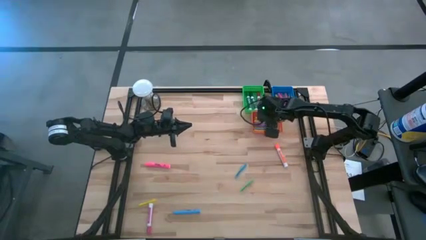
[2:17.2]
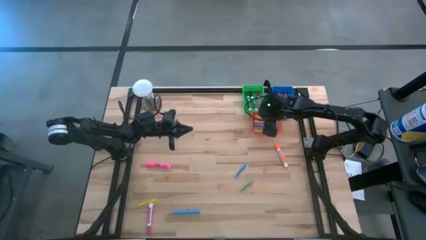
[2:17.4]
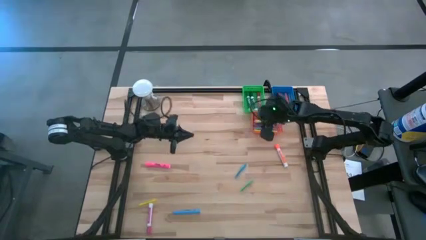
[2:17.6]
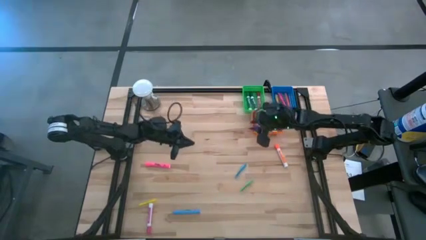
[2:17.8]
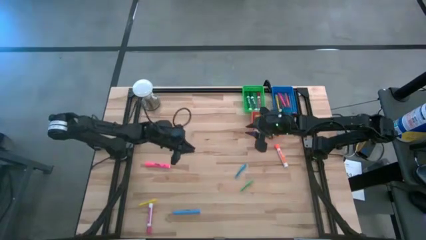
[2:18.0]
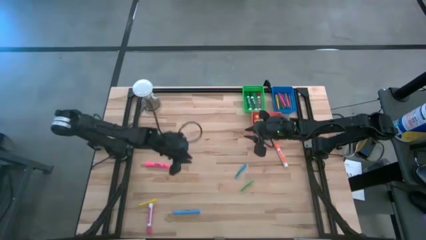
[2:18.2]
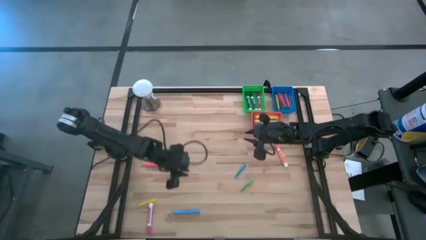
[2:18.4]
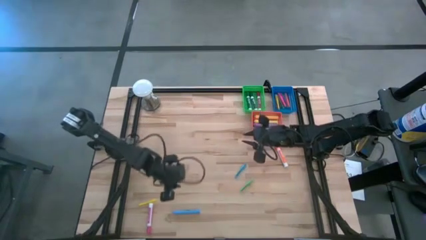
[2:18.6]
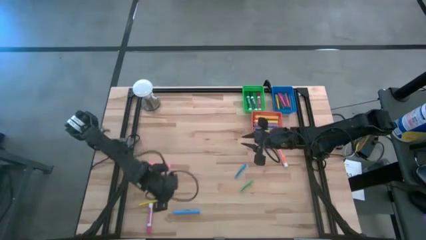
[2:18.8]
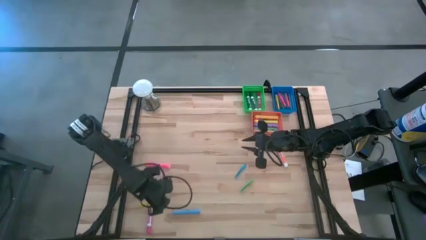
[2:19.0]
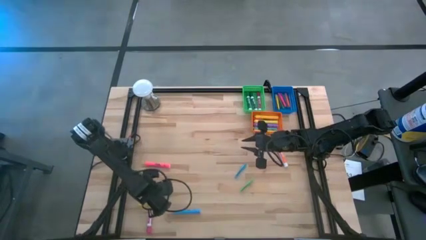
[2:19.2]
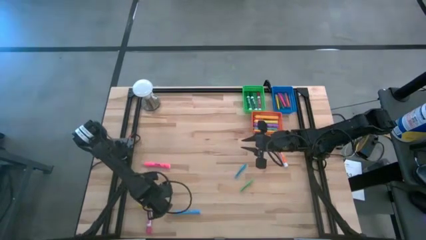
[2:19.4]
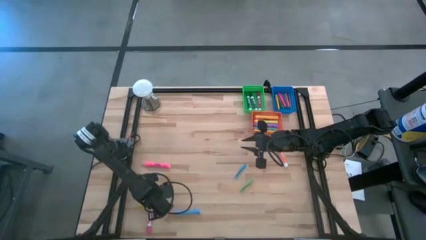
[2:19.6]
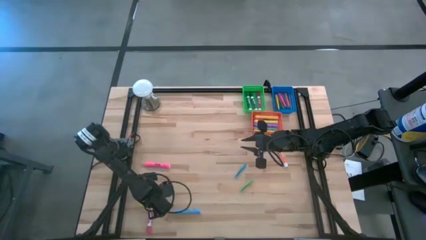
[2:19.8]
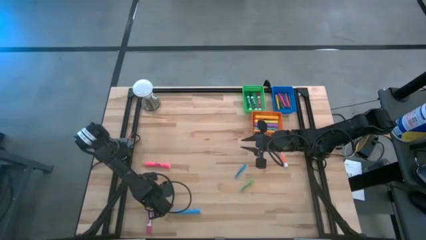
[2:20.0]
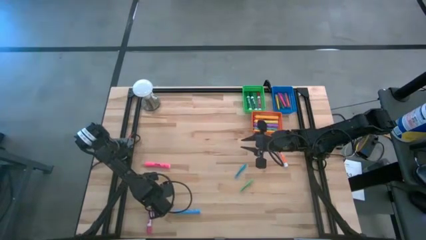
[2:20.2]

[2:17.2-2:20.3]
Task: Pick & Place Markers
Put the yellow pen into the blue bin

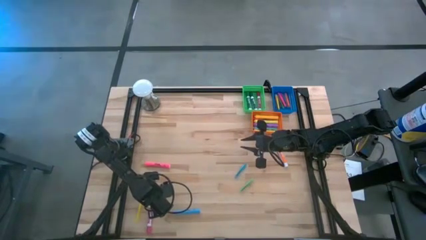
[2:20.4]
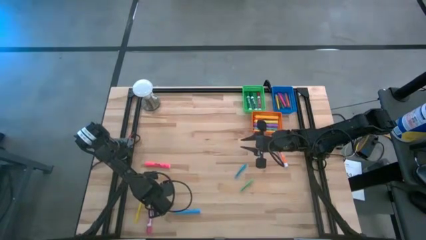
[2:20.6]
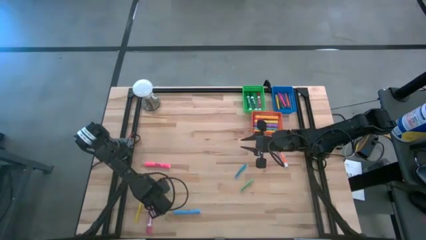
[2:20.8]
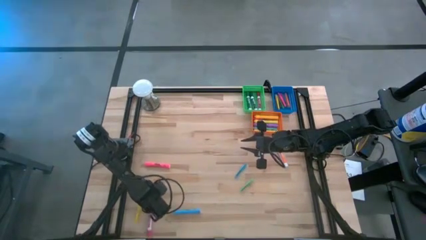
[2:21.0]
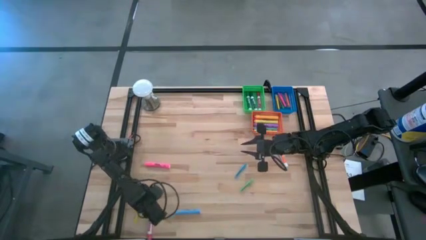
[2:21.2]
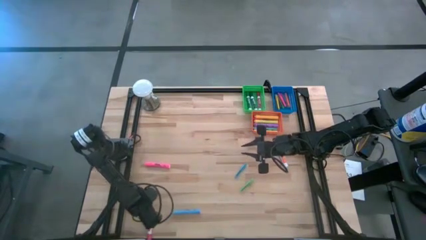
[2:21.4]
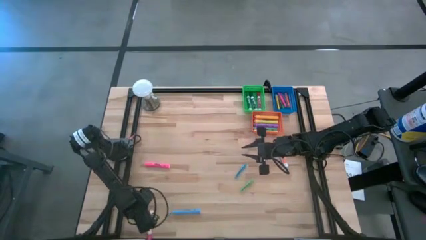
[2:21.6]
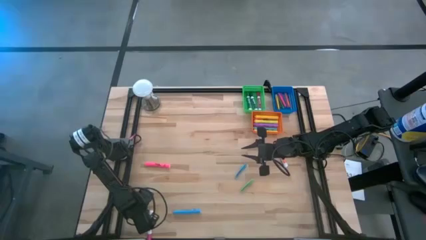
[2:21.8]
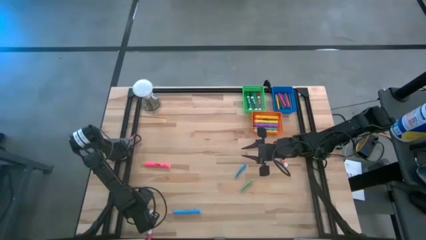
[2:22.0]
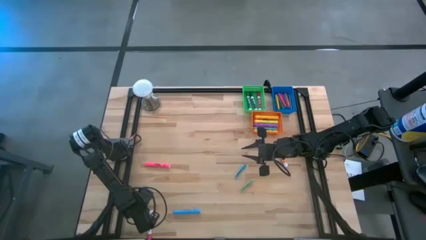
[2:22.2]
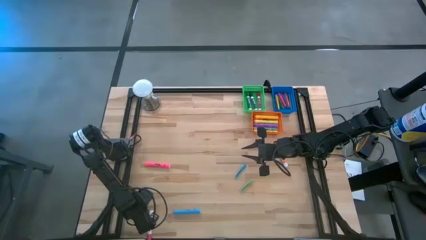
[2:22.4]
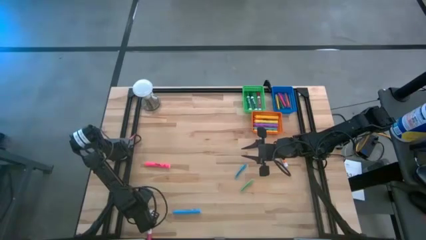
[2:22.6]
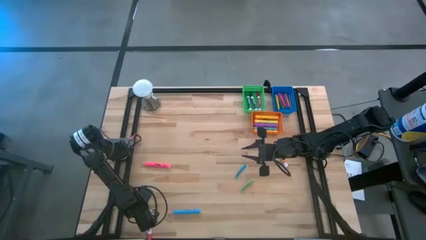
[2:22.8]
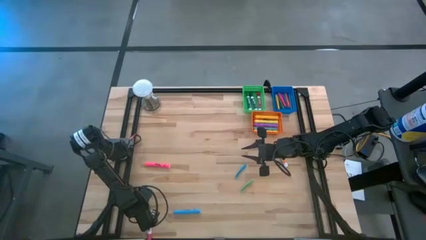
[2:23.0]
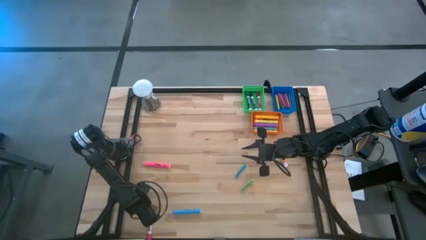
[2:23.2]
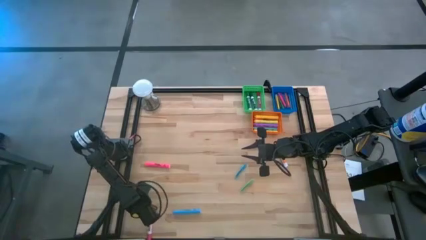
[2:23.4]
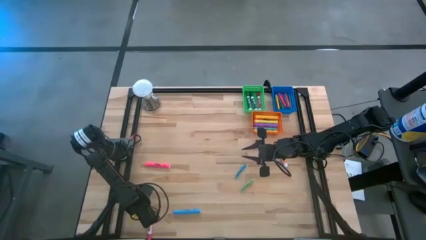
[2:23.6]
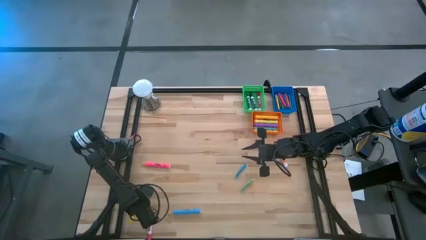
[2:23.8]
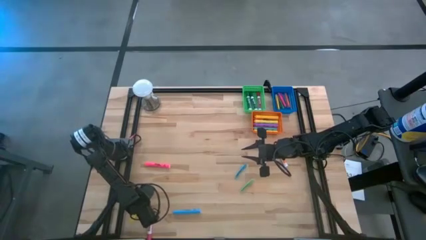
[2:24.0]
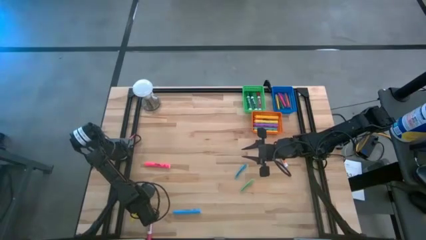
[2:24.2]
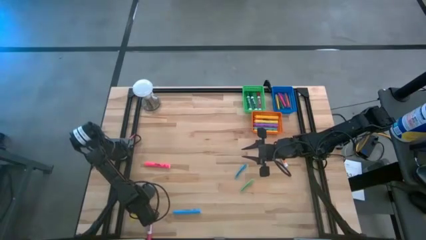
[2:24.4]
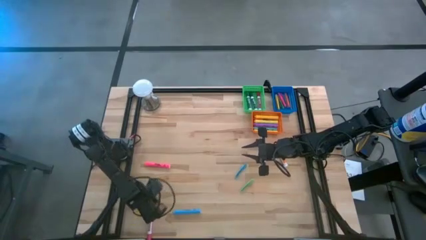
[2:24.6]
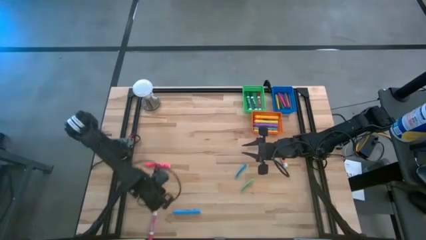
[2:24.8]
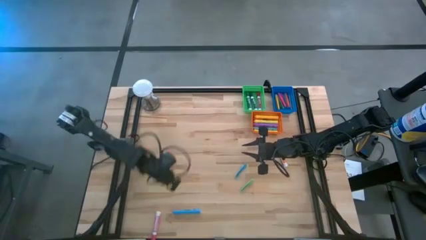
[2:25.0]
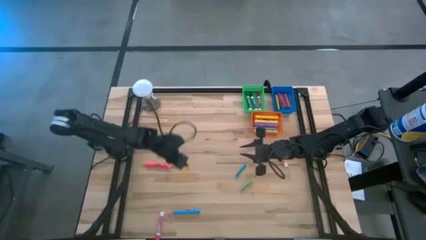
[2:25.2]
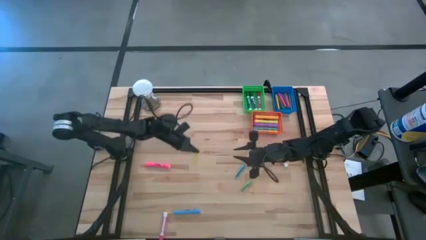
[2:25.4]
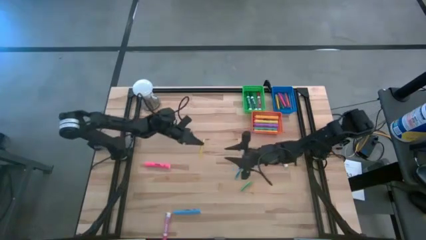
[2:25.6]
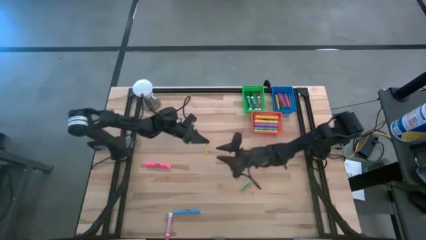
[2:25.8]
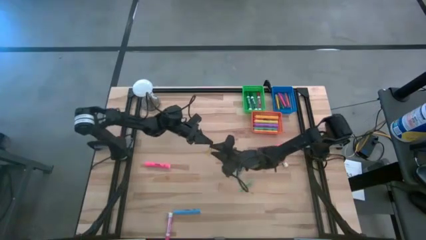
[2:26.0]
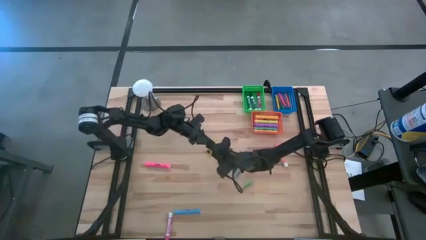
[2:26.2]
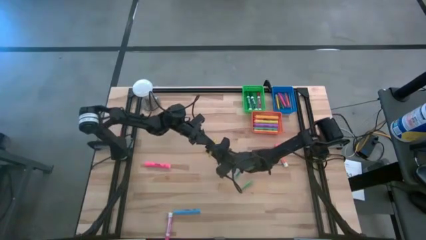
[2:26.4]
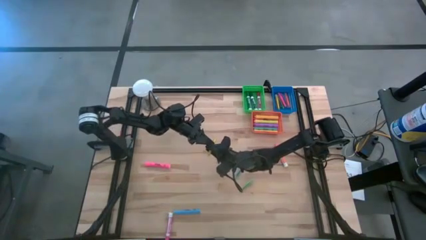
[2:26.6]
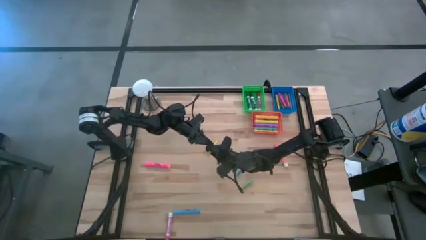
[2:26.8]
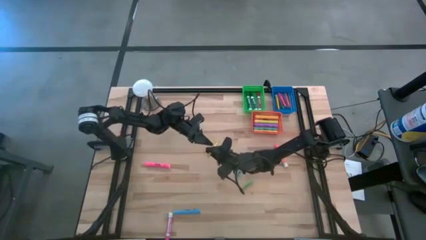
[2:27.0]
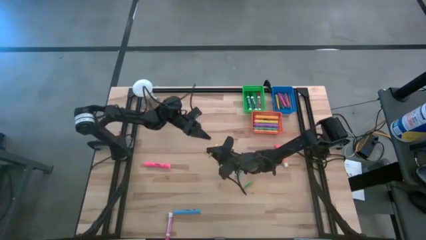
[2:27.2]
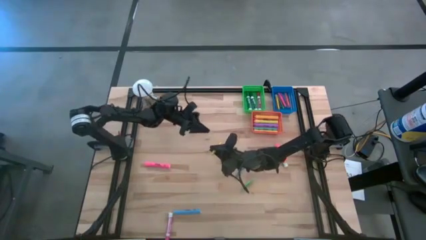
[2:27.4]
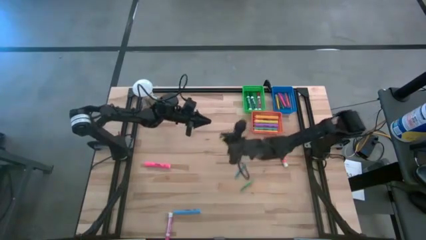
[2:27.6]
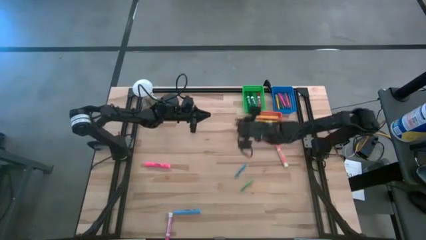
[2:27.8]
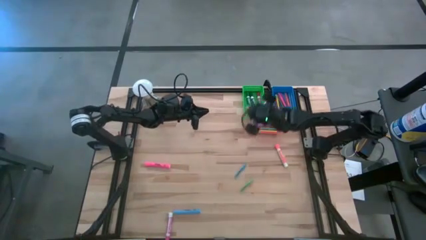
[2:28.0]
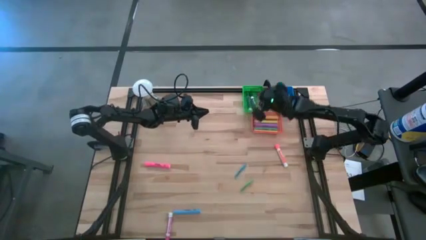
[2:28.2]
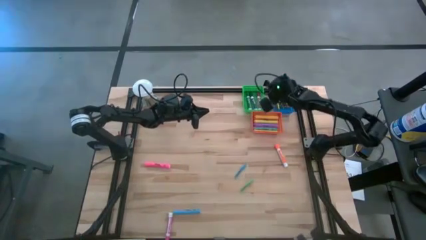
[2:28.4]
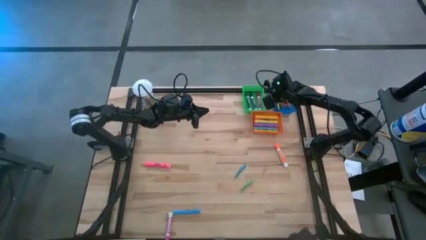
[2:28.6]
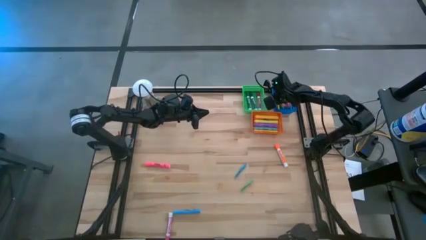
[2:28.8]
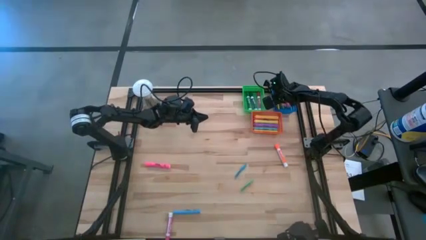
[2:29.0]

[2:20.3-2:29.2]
Put the yellow pen into the blue bin

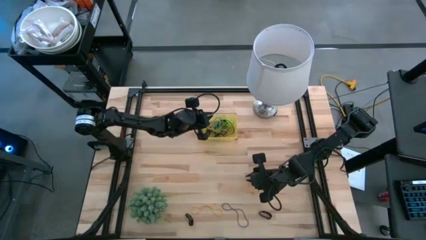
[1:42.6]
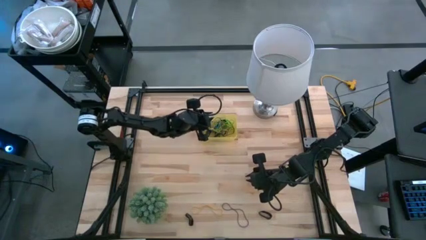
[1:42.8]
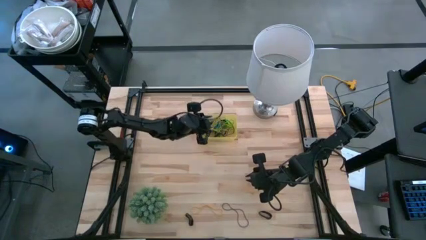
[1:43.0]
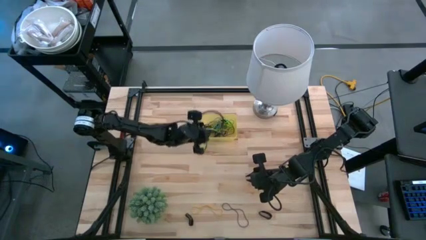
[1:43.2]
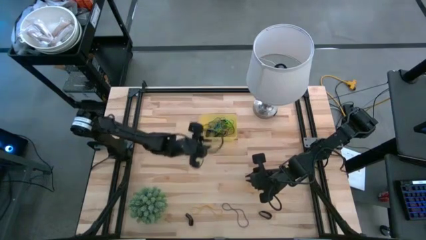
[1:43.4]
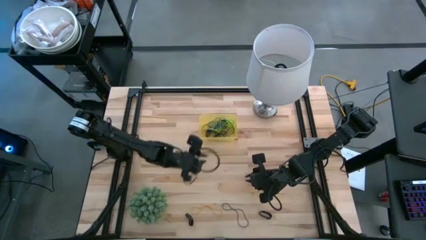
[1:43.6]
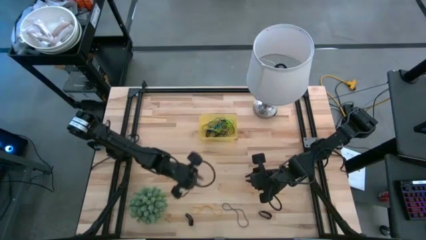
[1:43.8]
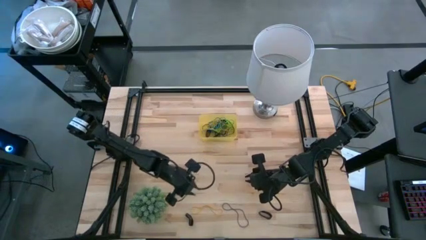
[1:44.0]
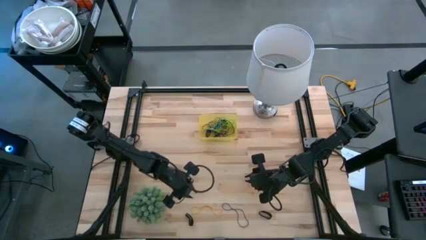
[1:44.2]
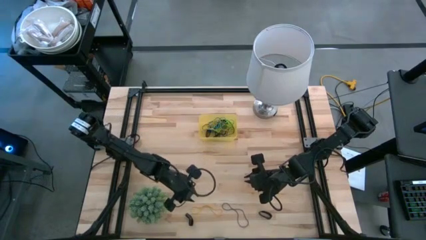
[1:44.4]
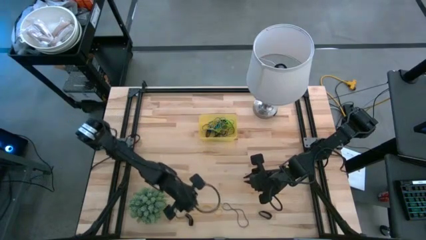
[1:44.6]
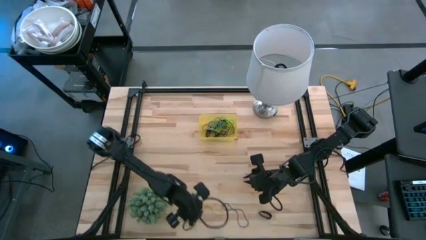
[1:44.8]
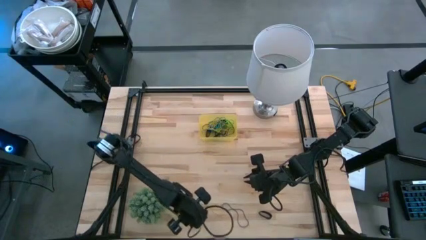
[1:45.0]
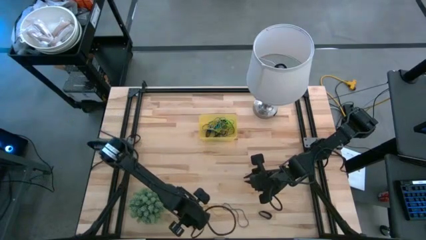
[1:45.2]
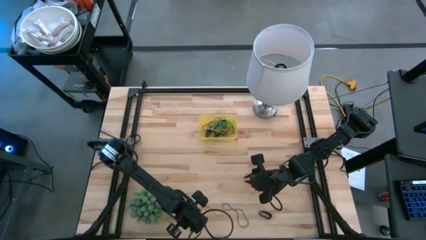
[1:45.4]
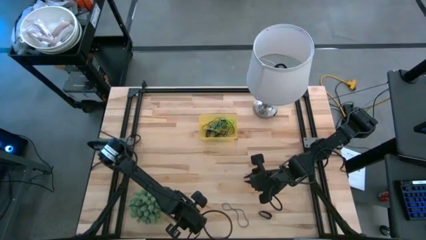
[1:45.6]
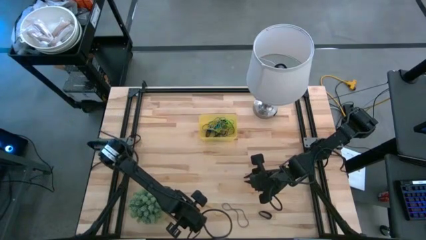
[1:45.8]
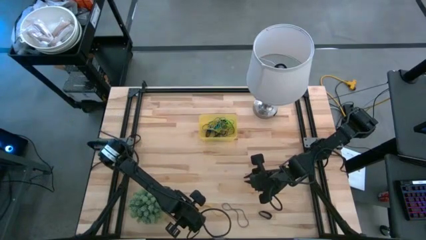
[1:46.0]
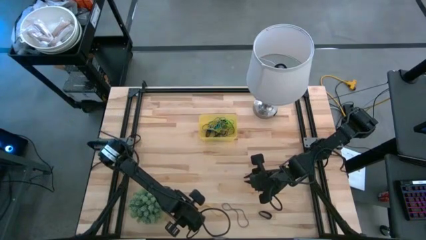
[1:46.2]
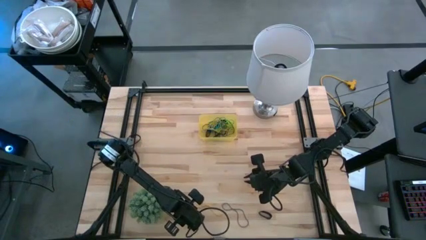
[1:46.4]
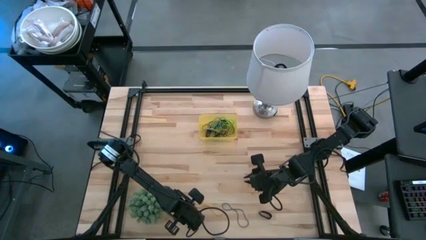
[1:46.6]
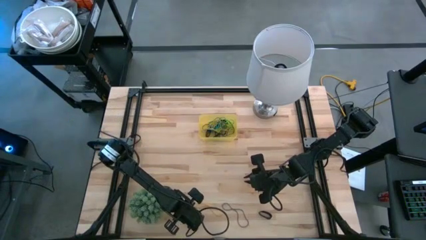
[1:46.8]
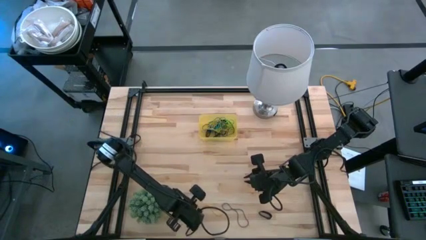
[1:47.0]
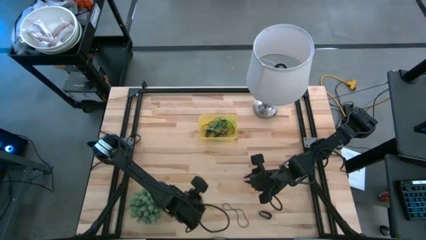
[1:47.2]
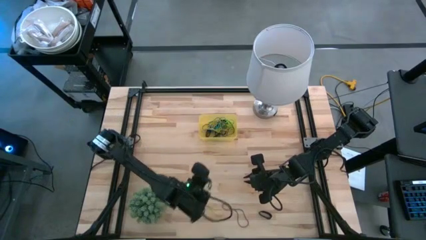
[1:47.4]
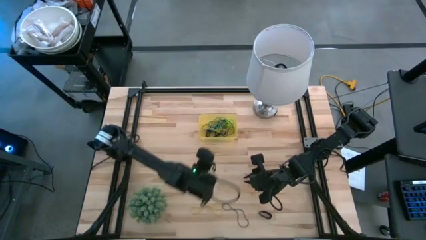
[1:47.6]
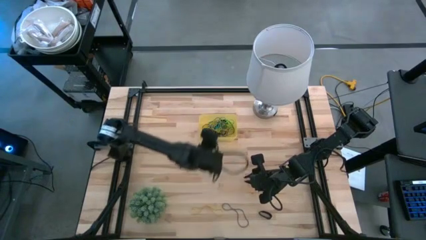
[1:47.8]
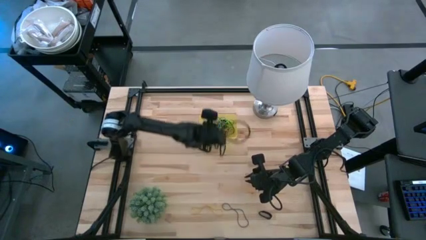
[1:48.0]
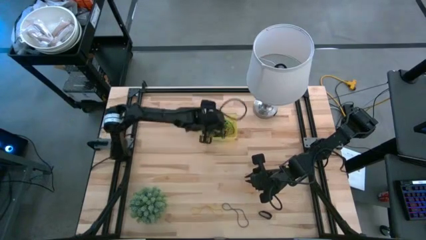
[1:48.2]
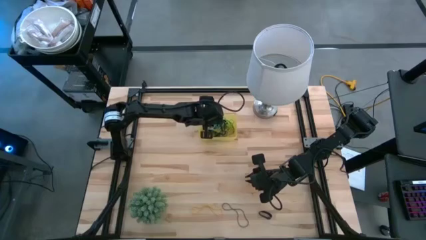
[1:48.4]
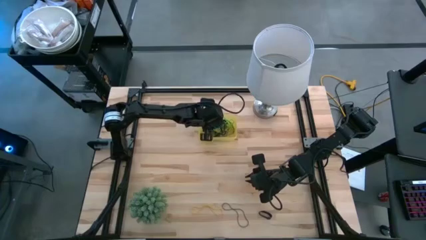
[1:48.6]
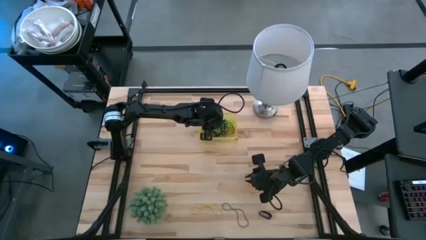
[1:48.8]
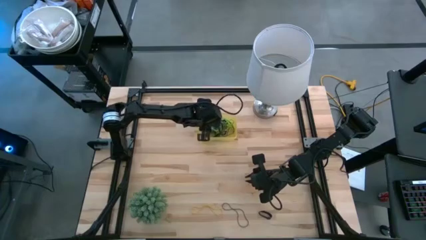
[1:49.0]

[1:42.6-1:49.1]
Task: Pick and place rubber bands into bin
Put the black rubber band into the yellow bin
